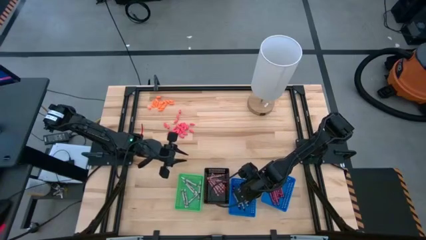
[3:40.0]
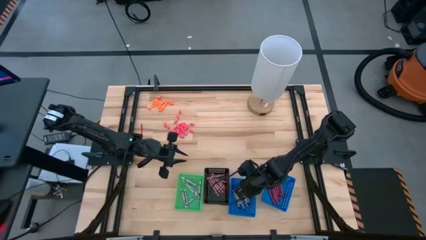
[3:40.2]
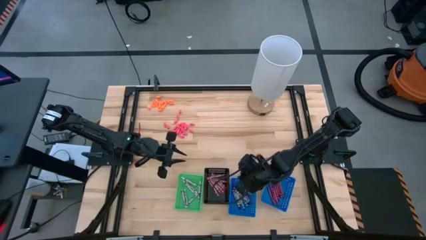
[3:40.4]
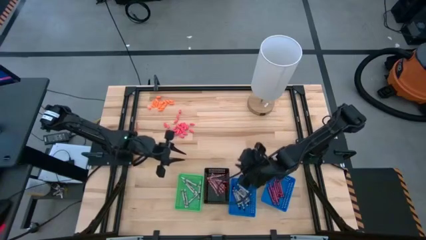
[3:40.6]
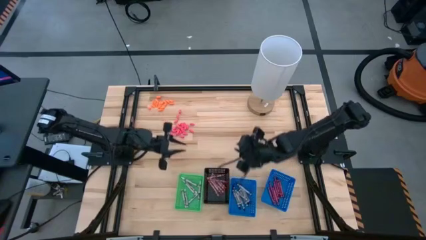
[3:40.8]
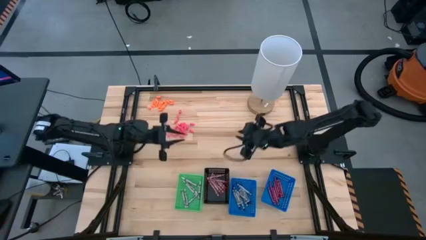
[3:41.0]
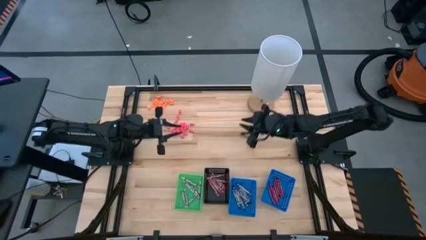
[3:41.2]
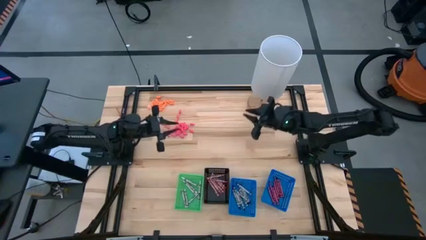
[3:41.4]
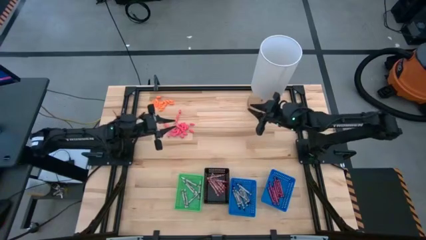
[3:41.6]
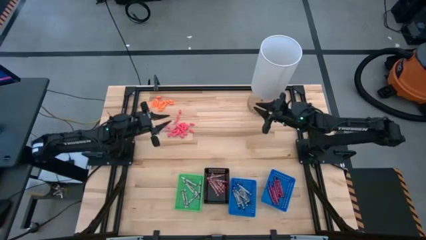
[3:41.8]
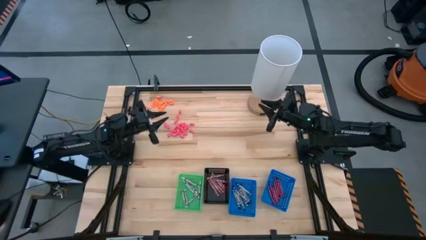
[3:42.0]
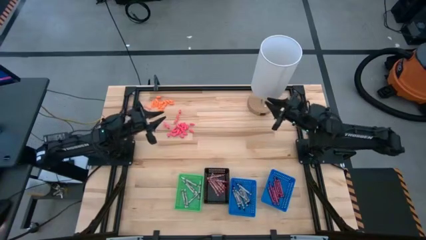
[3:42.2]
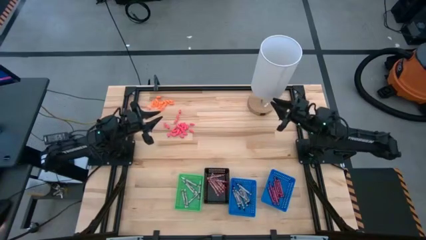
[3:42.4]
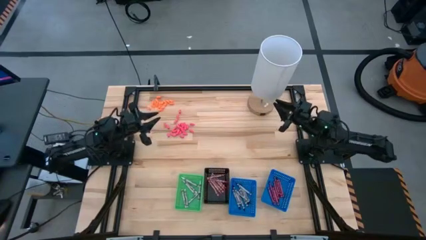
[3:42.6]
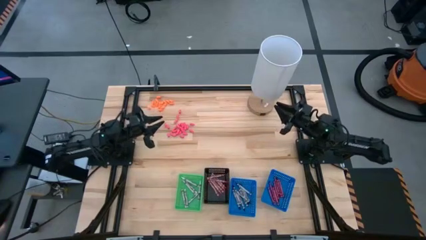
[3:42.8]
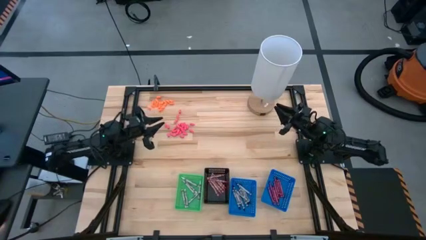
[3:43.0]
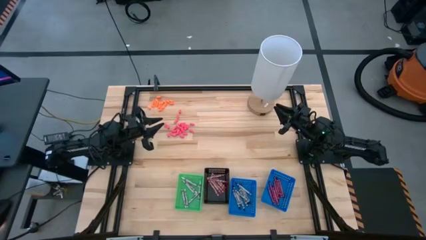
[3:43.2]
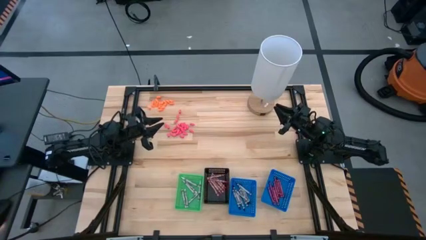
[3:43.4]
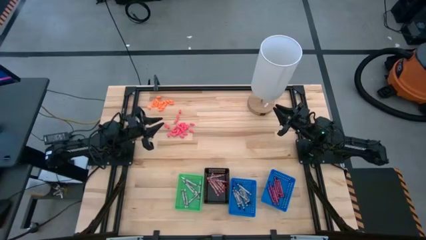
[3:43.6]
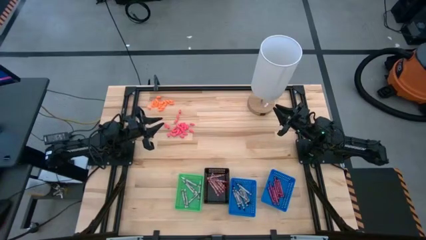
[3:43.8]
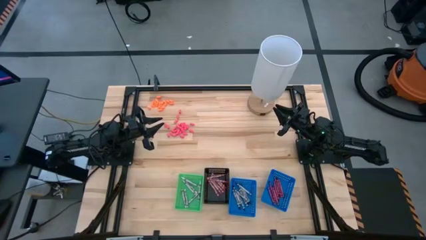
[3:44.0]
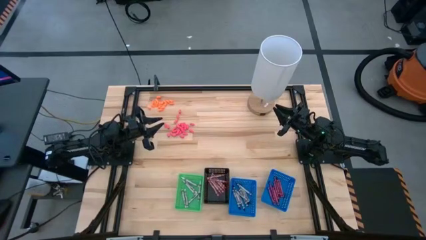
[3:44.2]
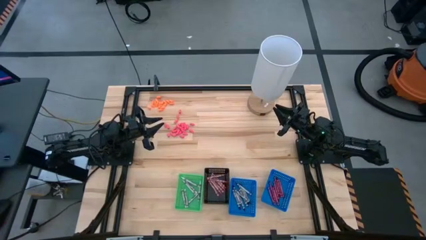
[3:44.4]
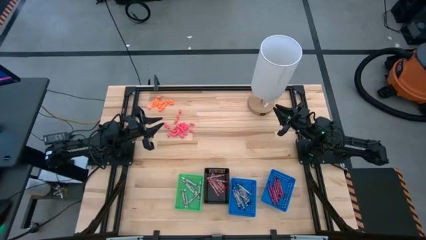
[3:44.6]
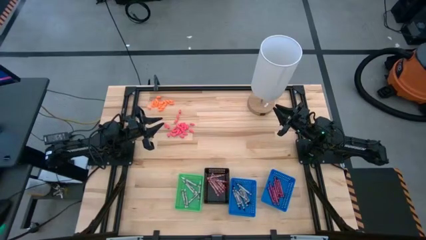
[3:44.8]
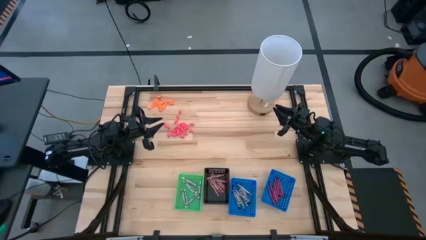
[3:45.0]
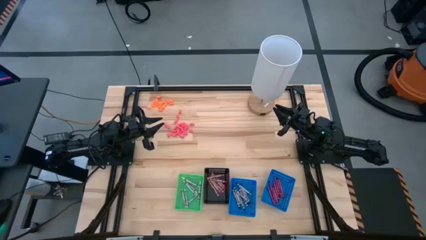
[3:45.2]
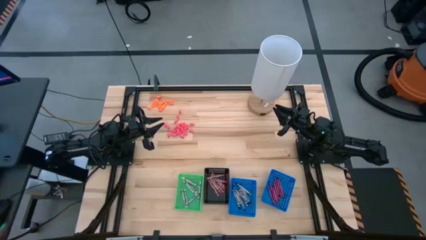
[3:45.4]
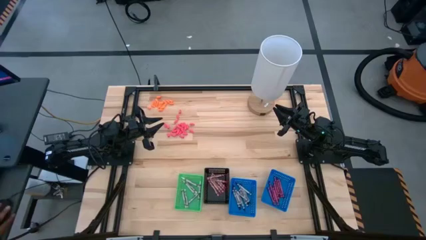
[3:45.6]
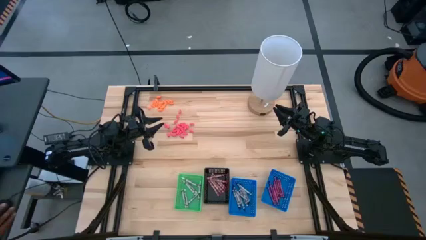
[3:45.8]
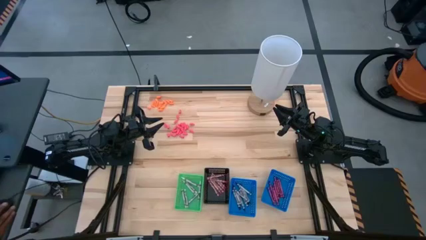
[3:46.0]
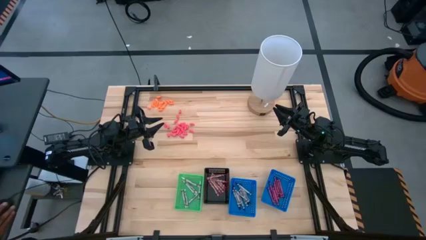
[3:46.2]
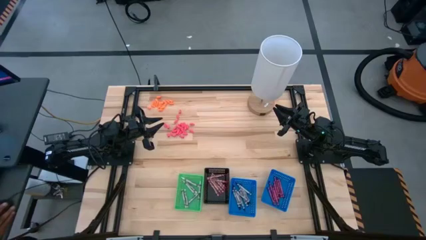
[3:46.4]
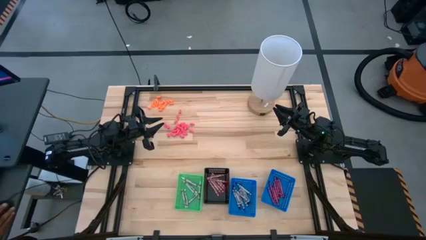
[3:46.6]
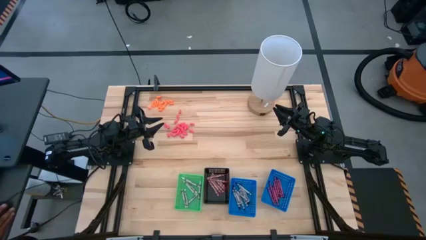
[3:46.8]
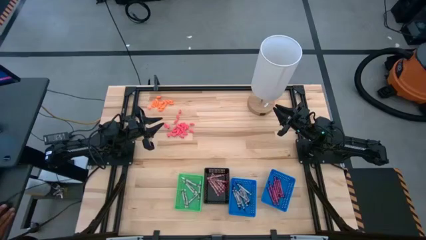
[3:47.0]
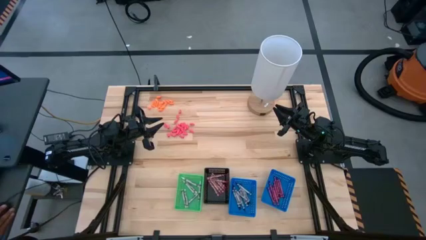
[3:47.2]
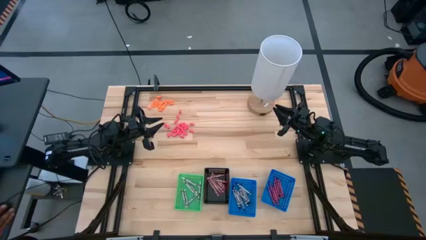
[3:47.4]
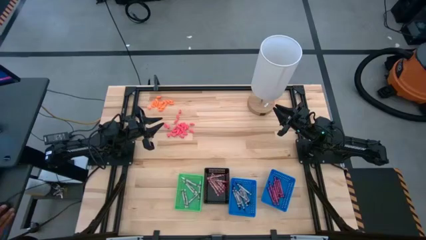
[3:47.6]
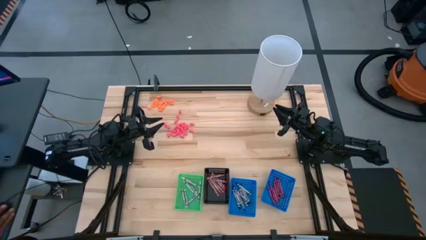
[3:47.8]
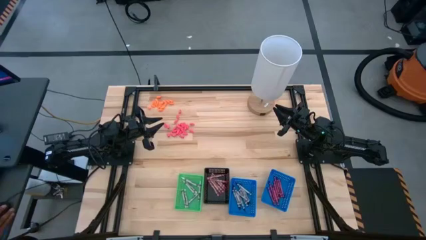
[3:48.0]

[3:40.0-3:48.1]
Task: Sort crayons
Return to Home Position

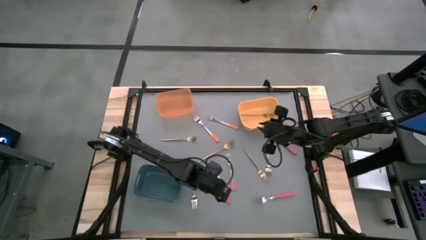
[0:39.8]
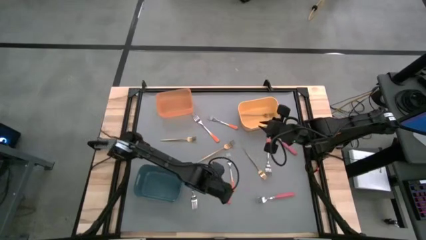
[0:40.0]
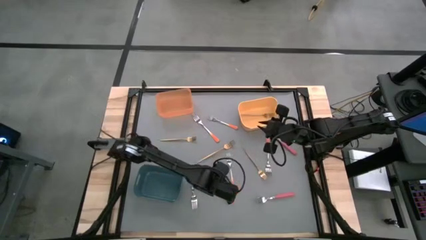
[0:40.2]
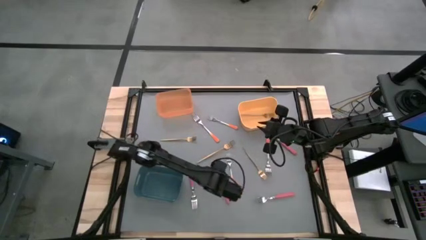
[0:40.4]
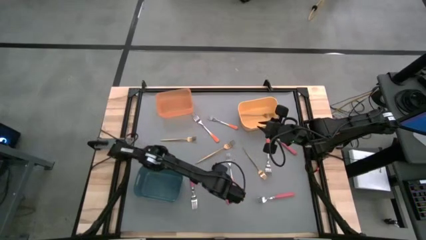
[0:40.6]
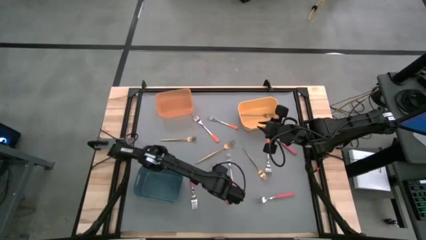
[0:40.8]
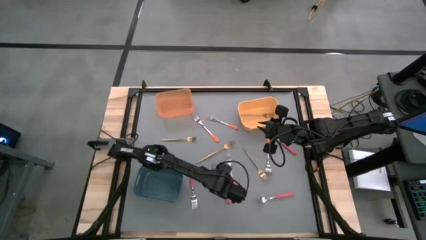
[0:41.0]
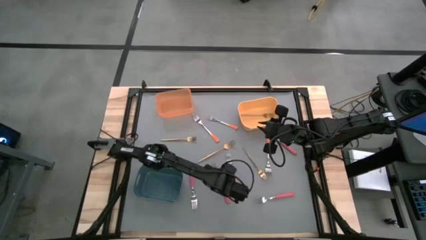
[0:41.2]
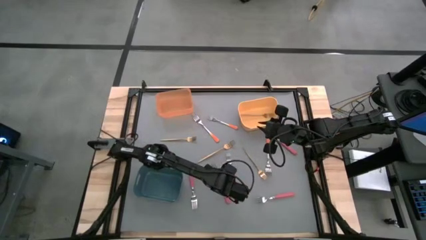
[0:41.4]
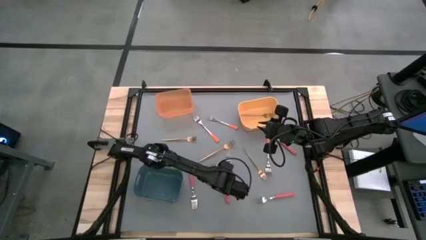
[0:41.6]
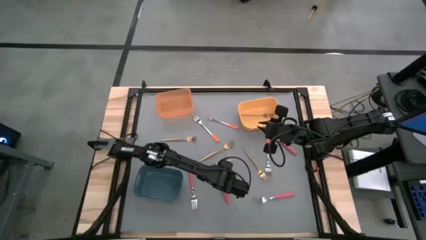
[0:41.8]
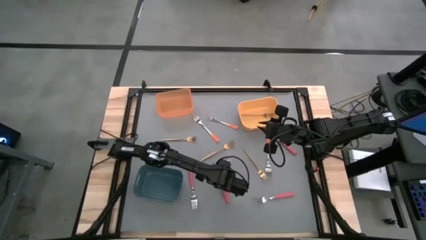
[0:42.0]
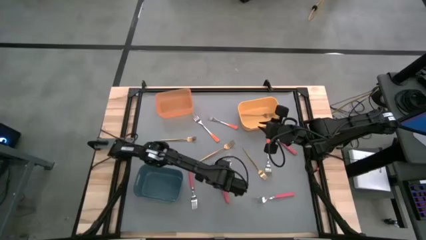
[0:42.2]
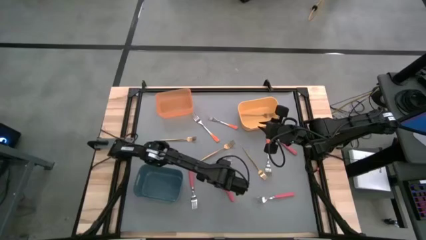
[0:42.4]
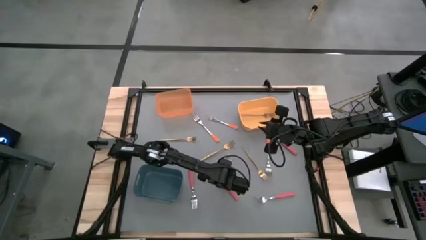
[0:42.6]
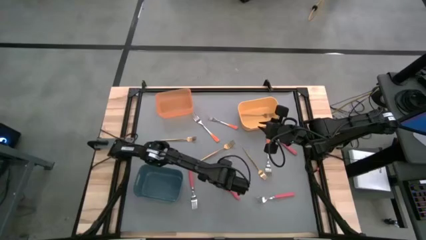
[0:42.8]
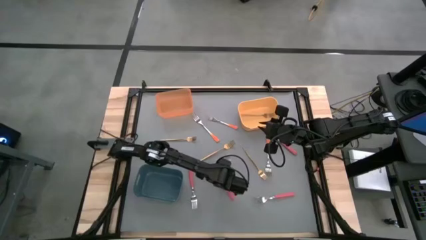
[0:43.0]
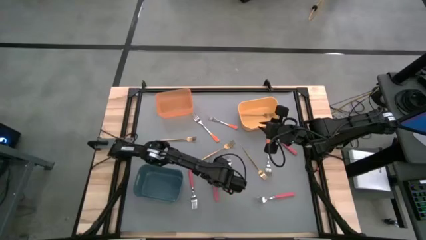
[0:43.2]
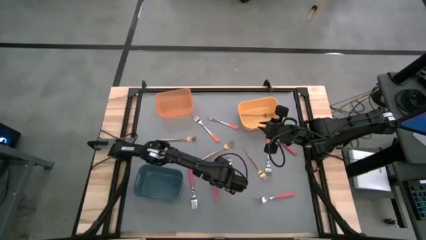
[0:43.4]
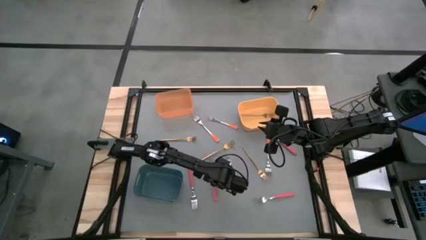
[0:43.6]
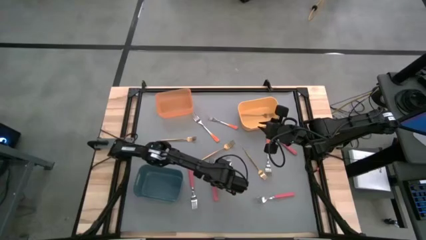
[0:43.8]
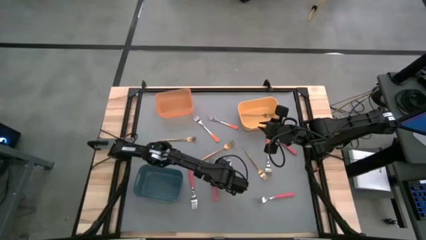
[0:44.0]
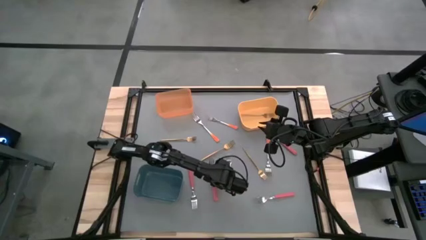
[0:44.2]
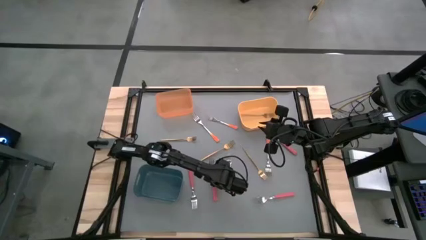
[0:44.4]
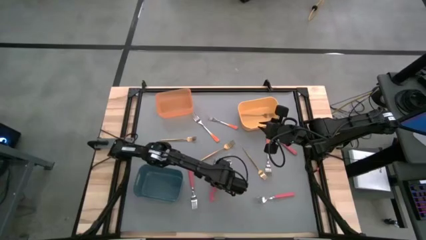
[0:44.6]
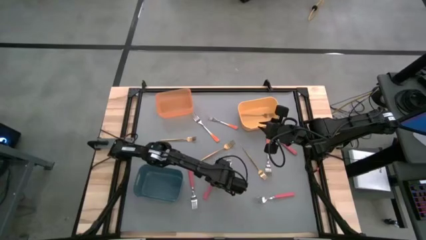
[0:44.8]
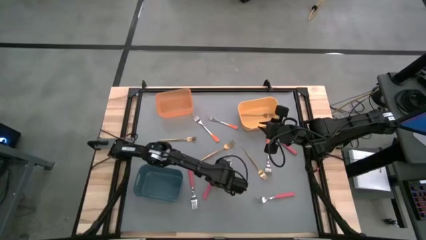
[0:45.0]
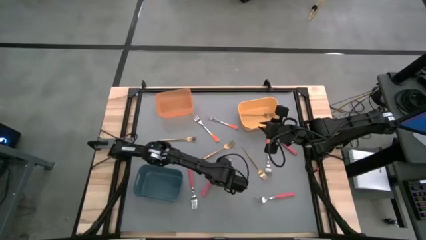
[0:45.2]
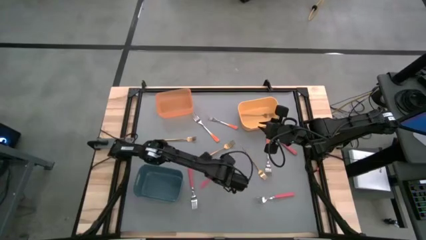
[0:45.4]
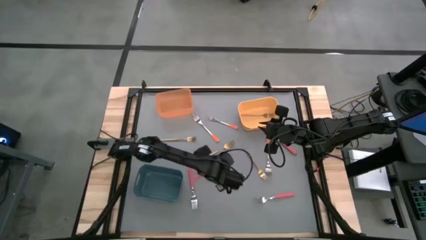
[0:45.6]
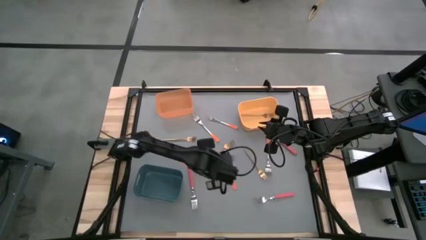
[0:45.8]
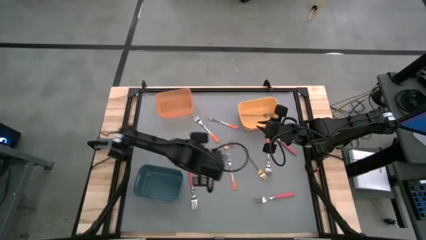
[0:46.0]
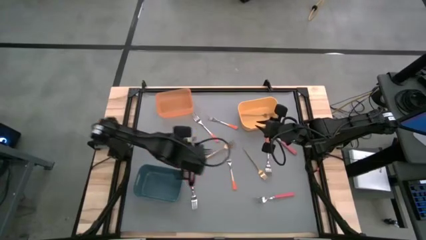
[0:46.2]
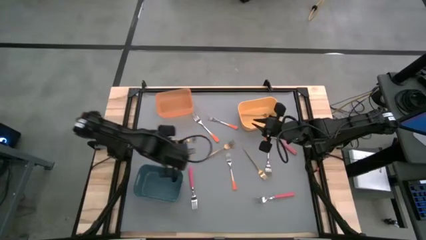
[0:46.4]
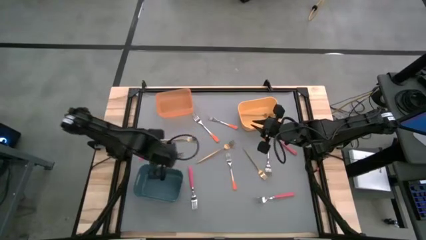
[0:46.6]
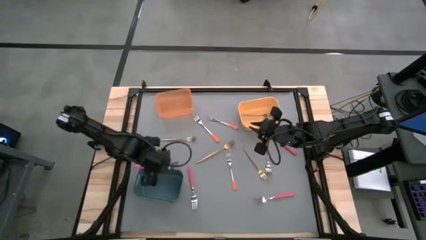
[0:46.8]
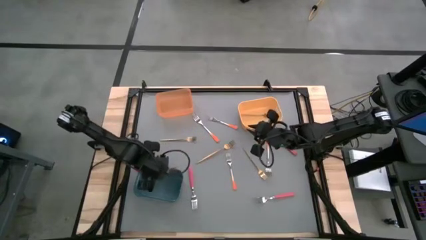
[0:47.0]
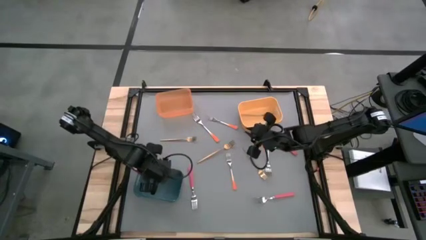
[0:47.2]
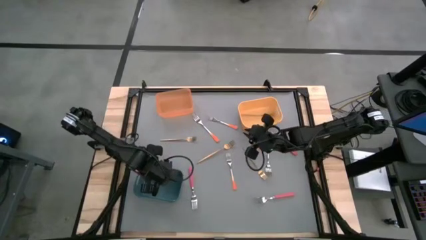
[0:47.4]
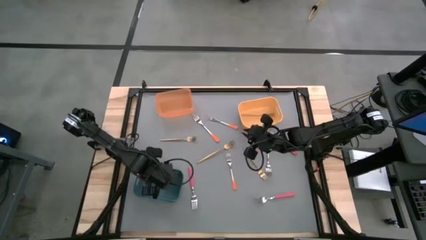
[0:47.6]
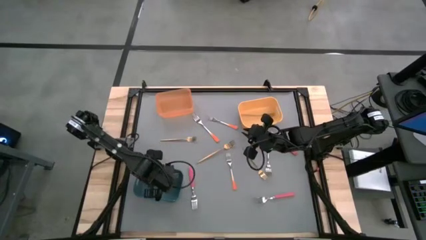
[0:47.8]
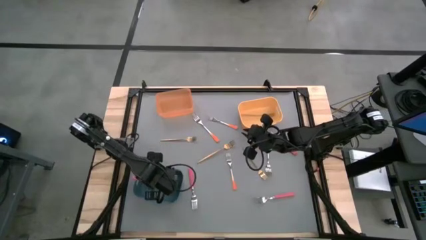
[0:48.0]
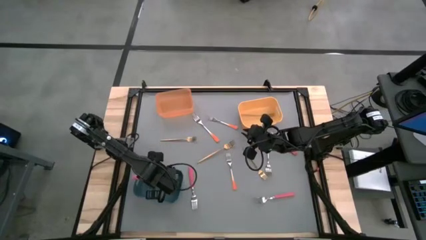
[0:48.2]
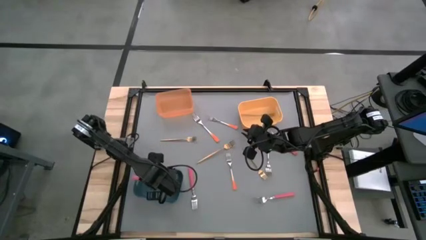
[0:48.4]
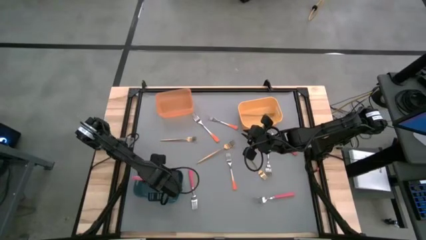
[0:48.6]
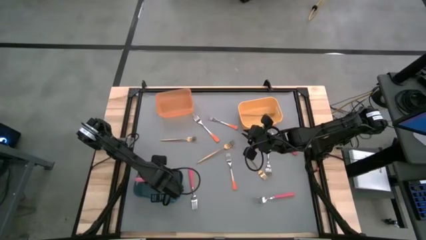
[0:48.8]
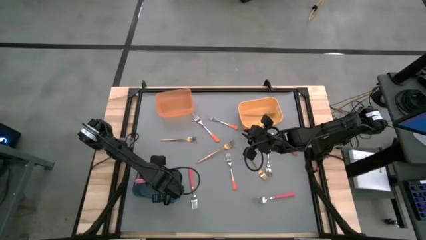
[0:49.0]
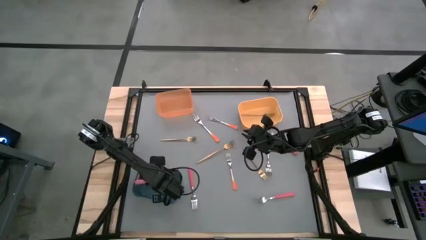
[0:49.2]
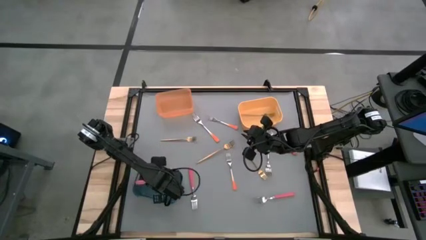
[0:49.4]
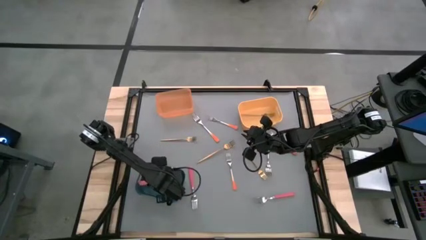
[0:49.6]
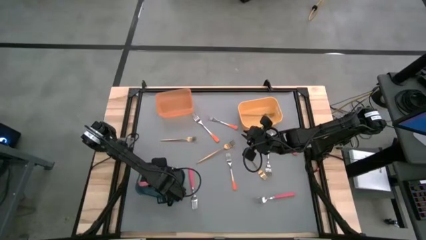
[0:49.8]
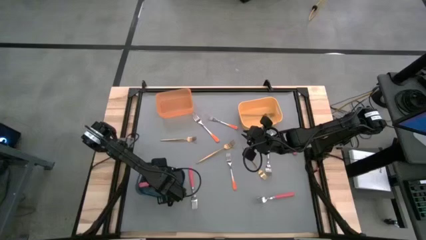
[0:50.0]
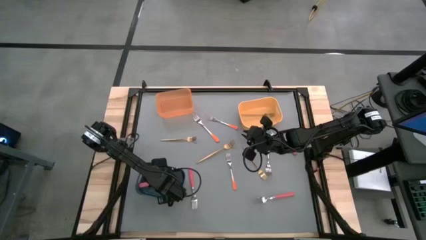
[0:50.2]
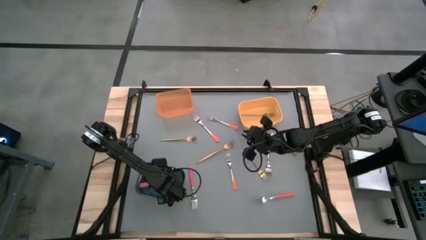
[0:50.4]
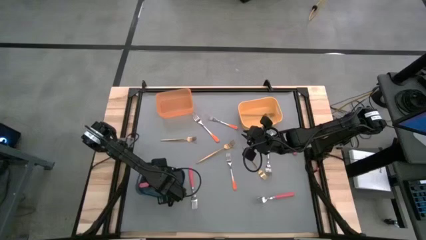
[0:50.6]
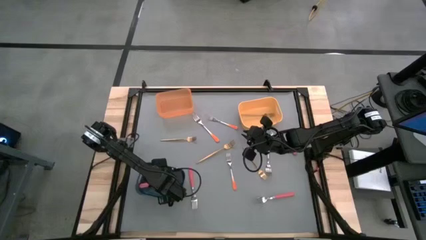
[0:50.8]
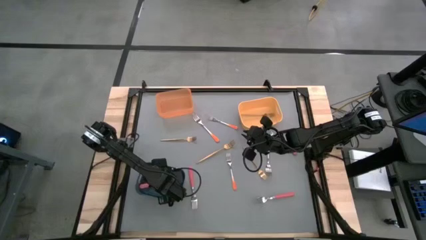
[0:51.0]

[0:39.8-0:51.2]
Task: Sort silverware by color (type)
Put the pink fork into the blue bin
